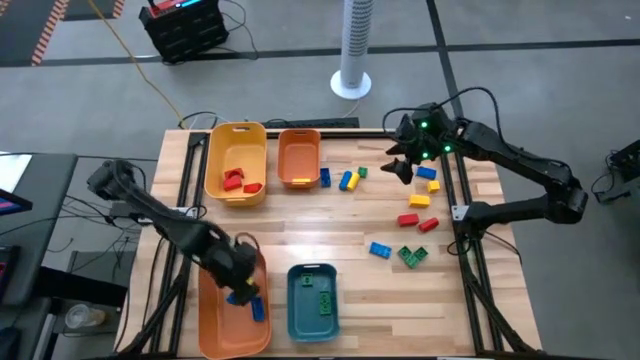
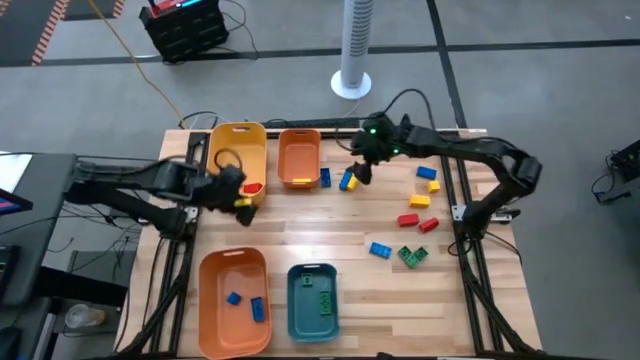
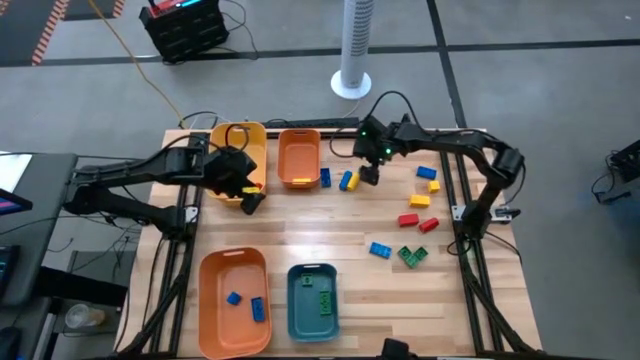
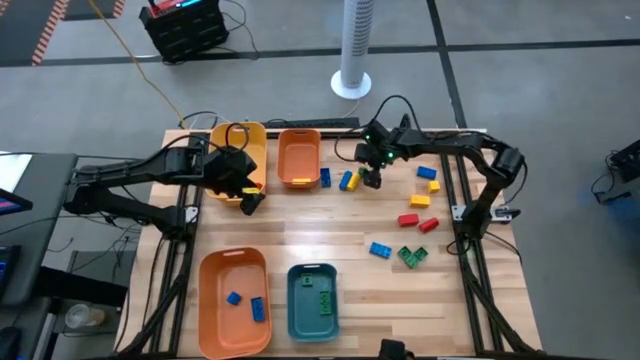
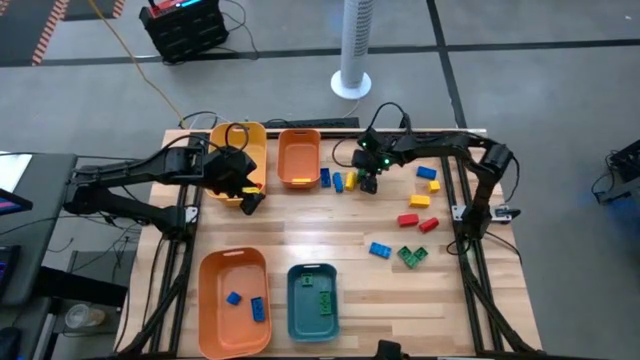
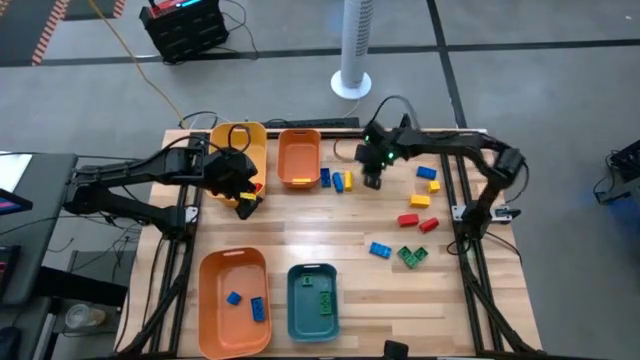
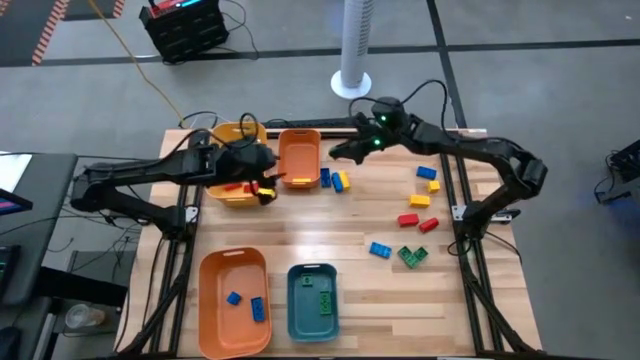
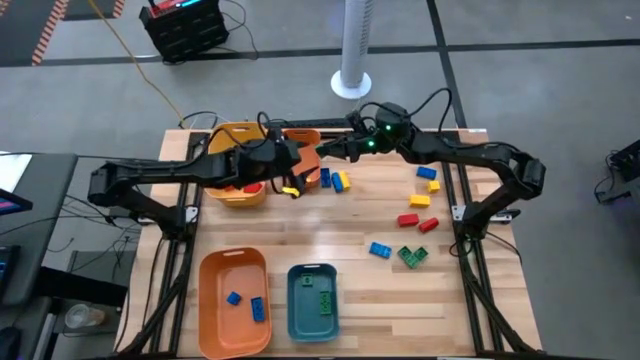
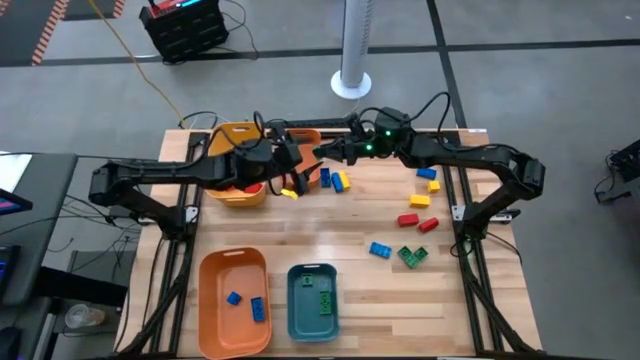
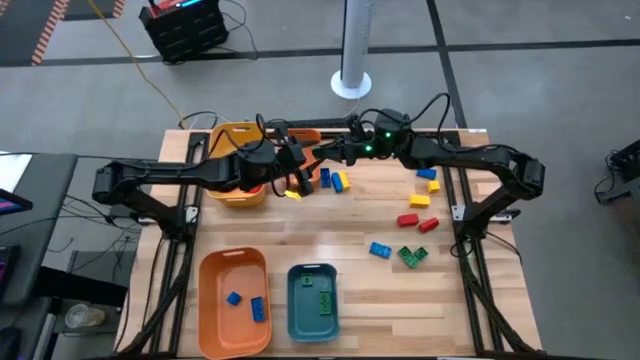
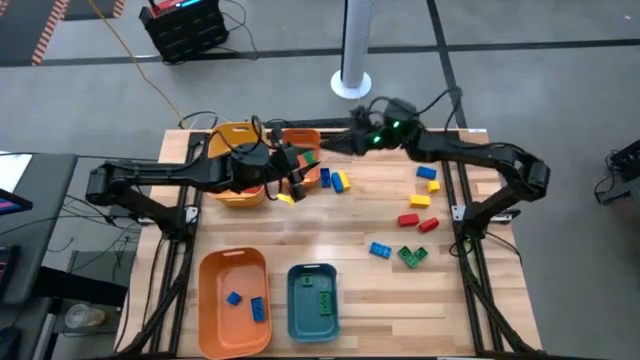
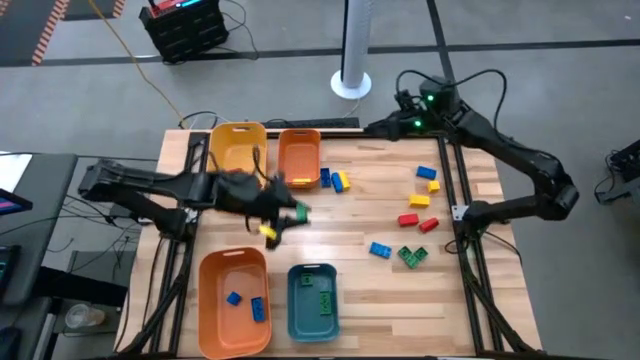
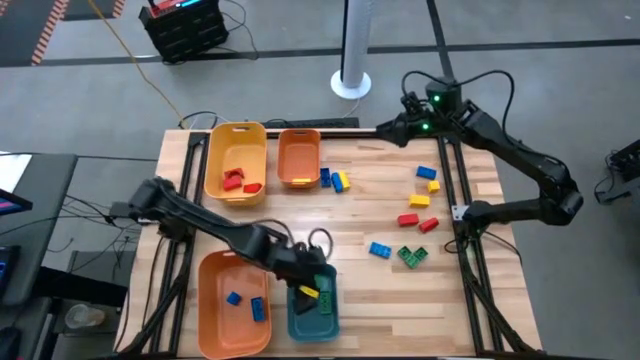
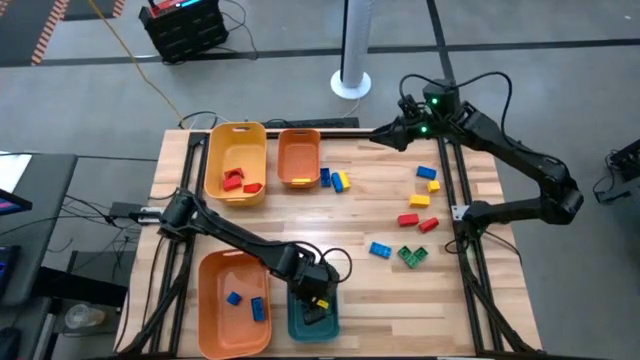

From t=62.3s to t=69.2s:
Task: Sort blocks
Put the green game piece into the blue bin

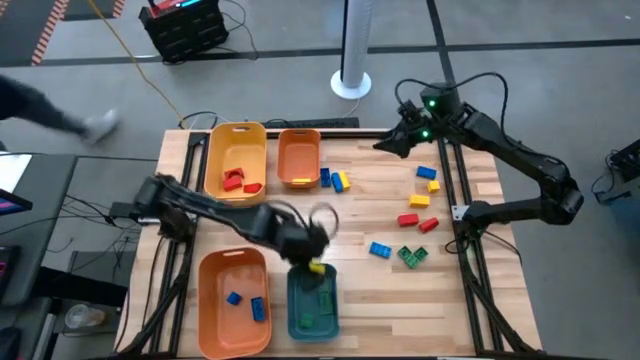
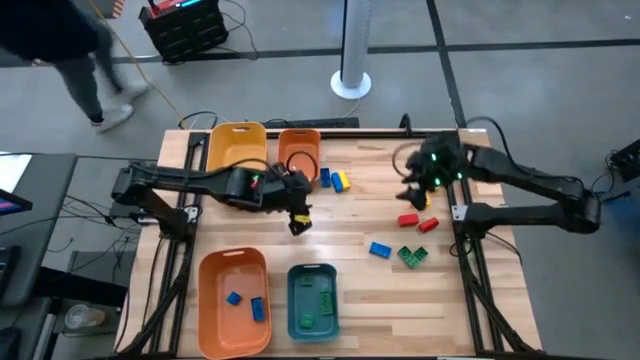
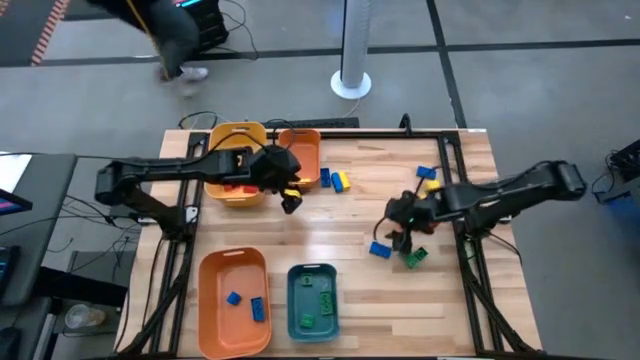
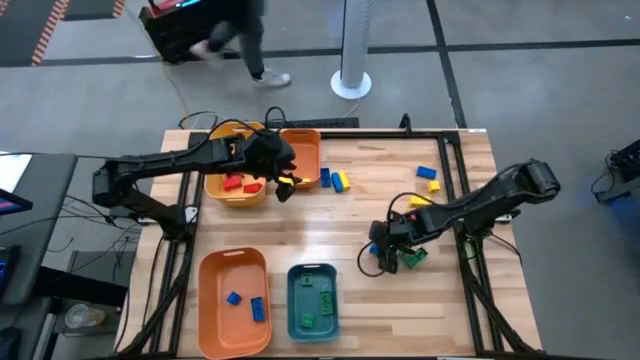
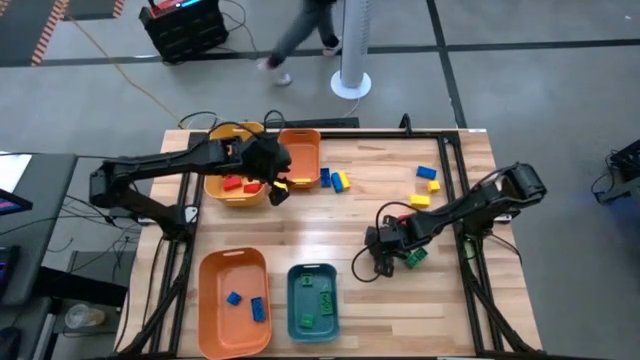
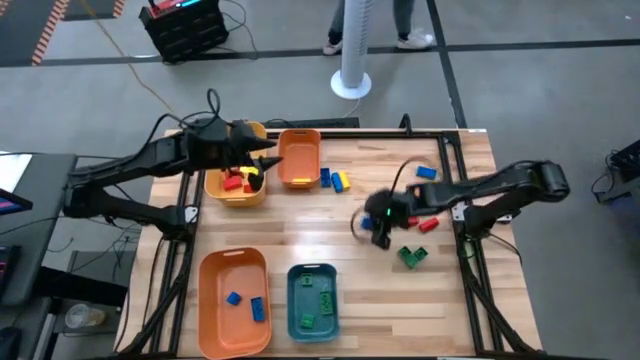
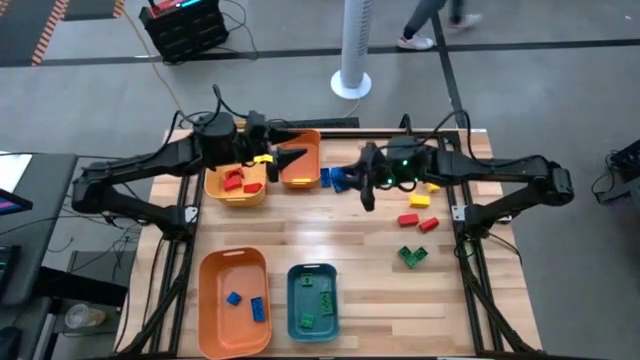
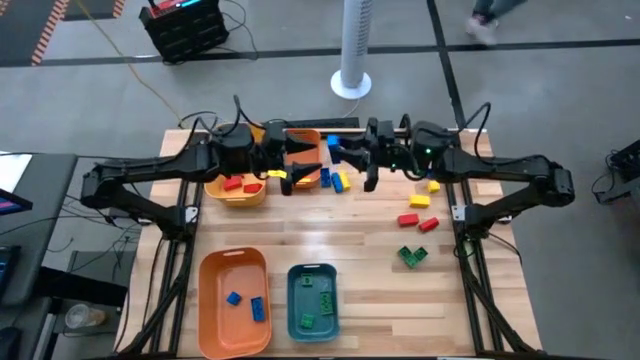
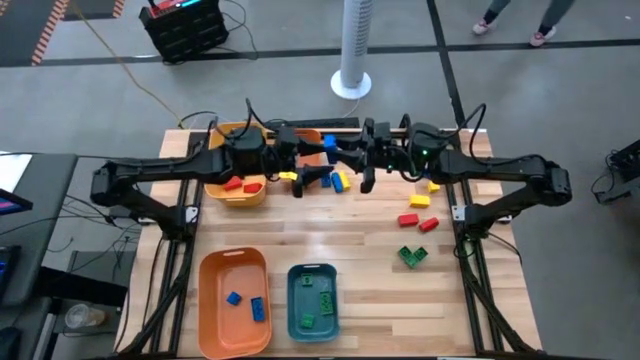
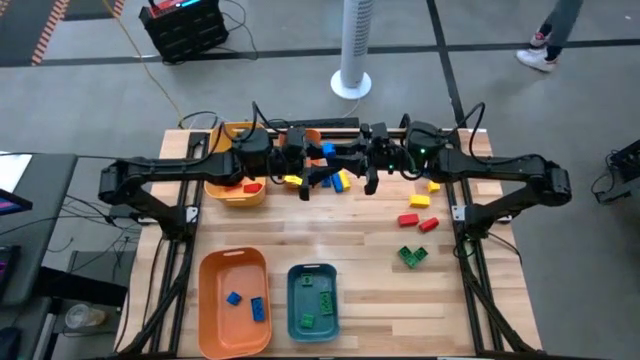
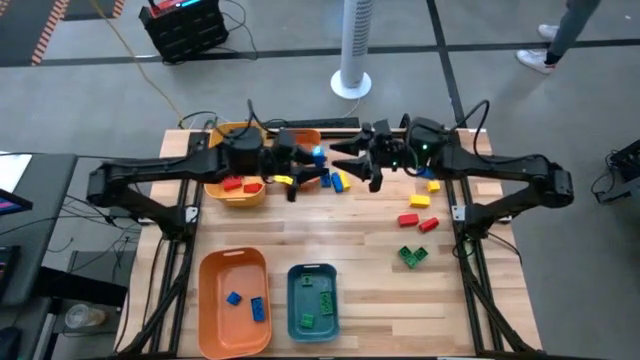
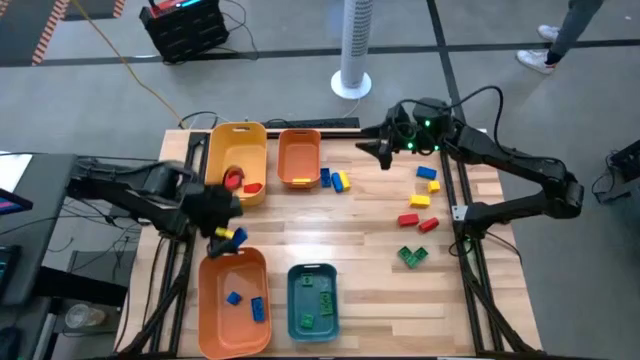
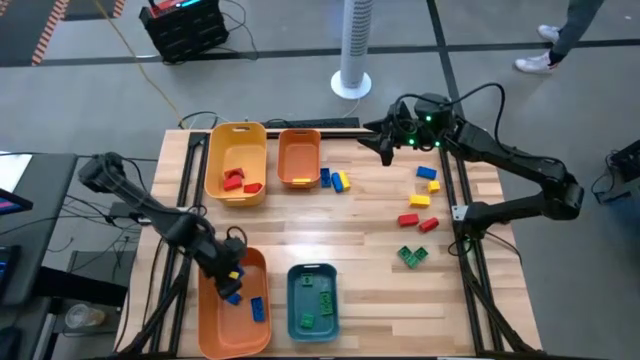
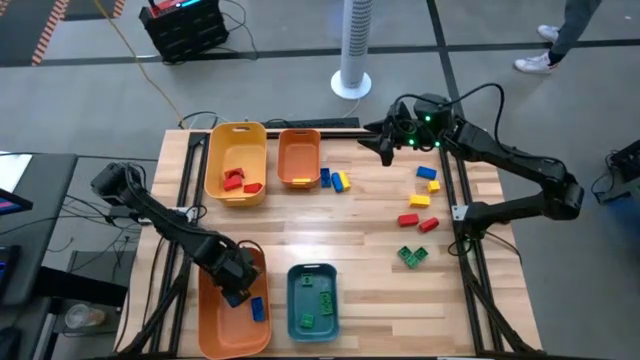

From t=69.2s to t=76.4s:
Put the blue game piece into the large orange bin

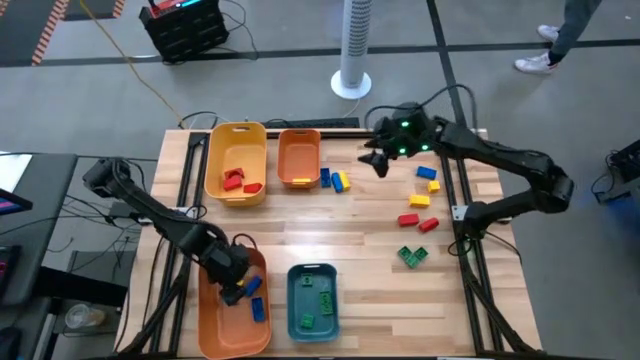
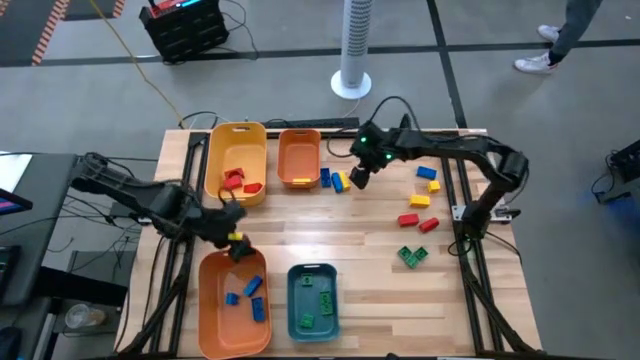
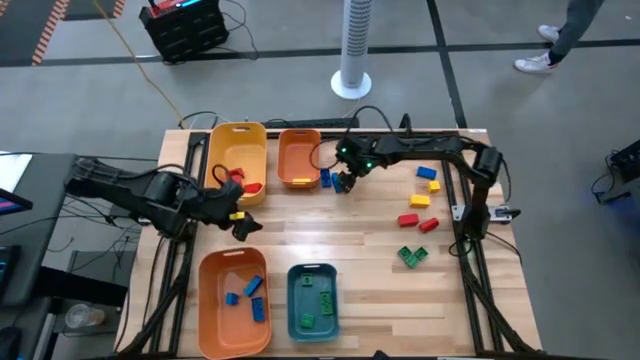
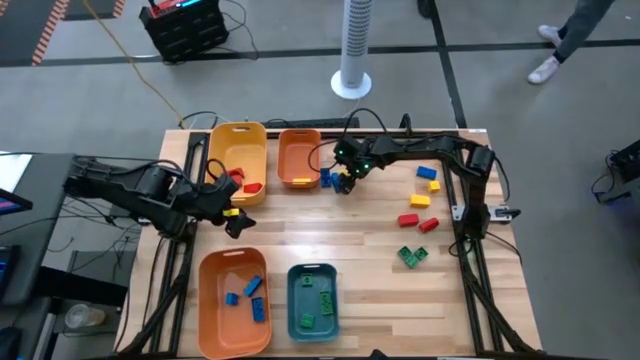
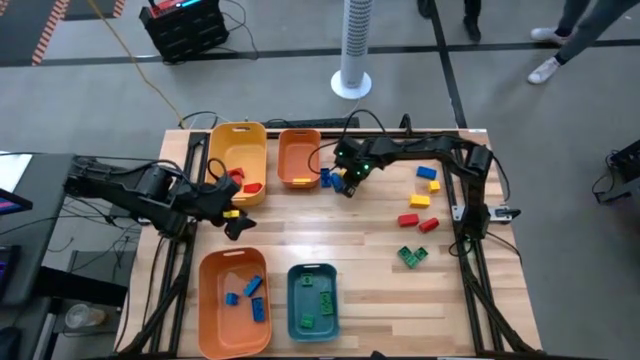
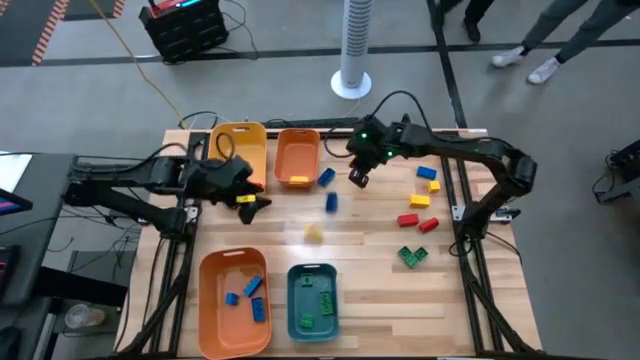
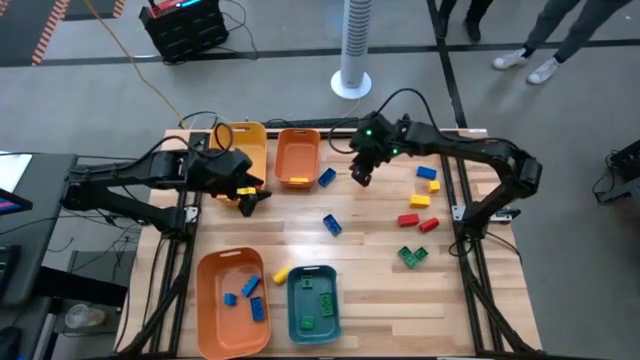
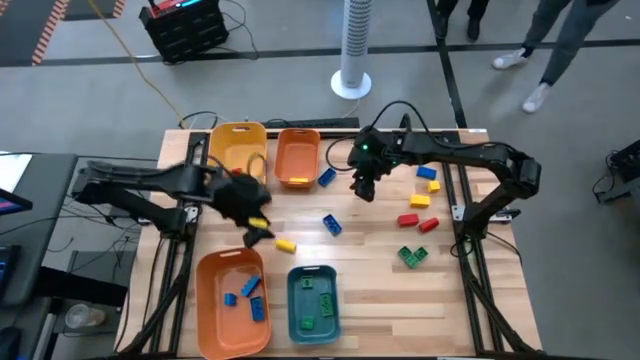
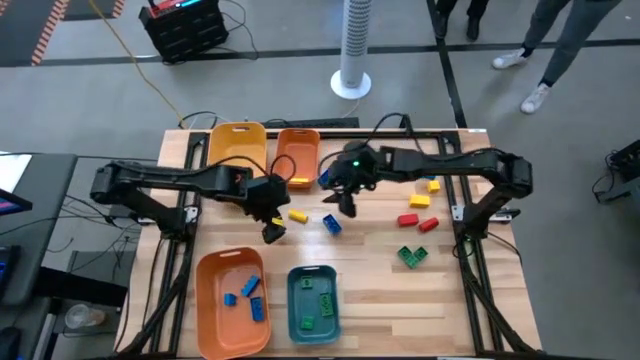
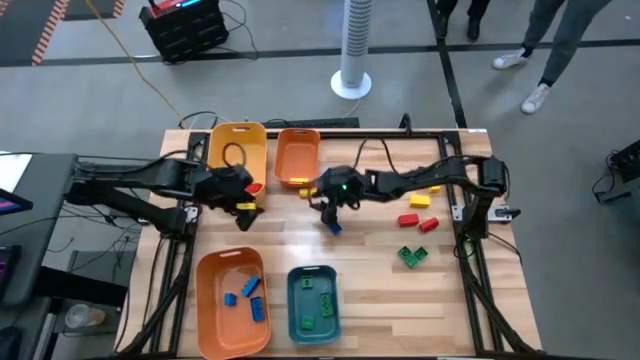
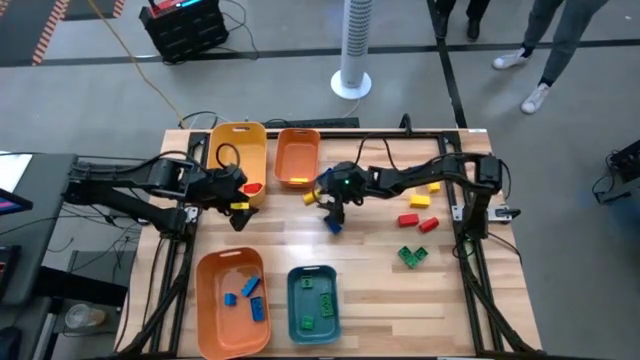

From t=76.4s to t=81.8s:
Put the yellow wooden block into the small orange bin

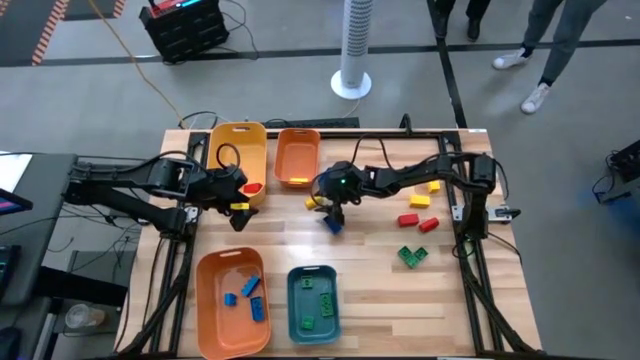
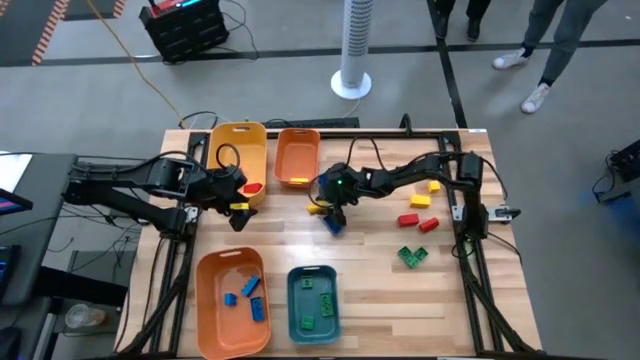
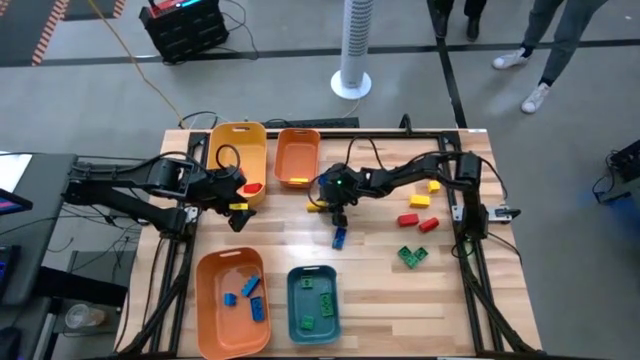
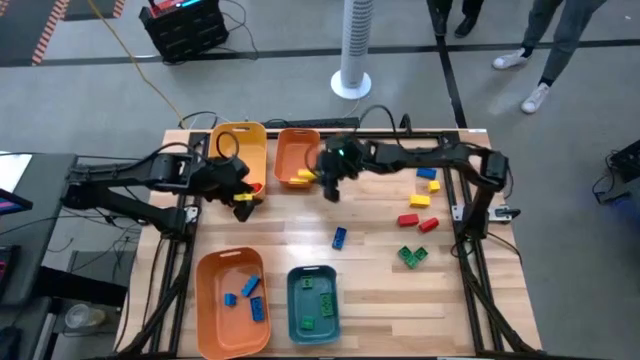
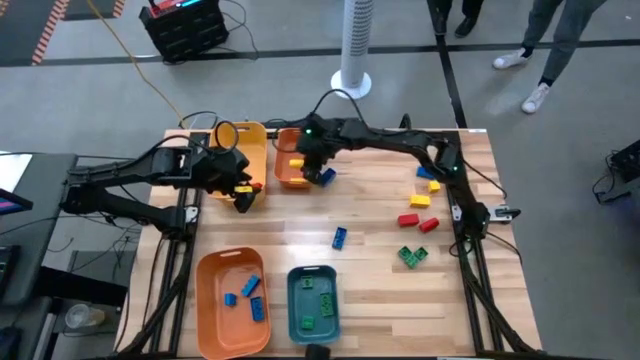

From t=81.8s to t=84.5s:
Put the yellow wooden block into the small orange bin
